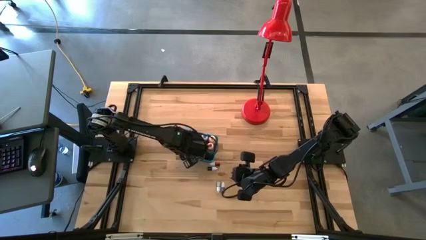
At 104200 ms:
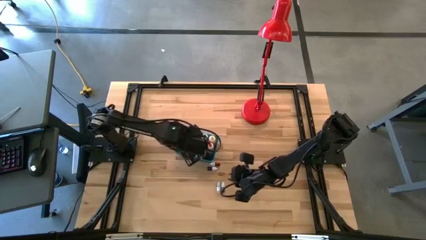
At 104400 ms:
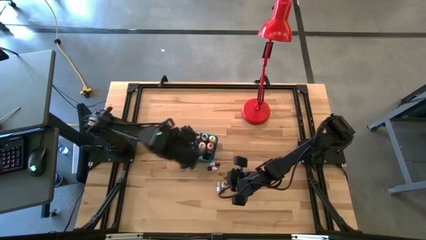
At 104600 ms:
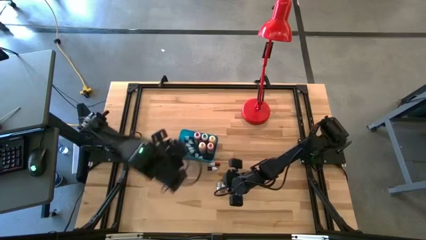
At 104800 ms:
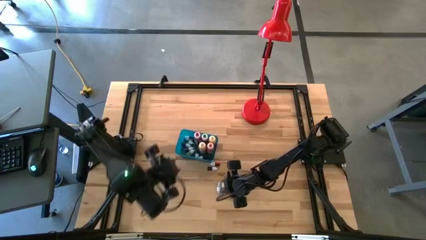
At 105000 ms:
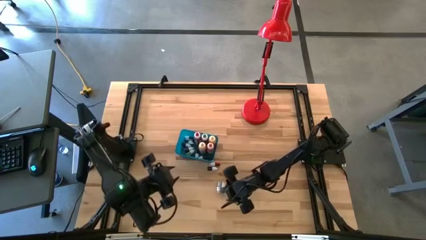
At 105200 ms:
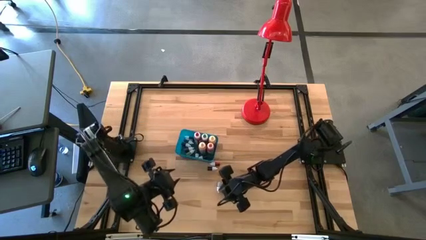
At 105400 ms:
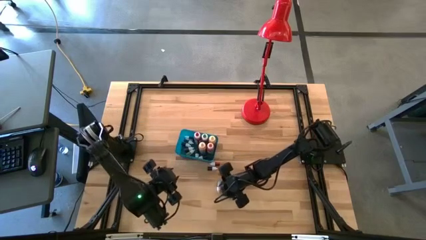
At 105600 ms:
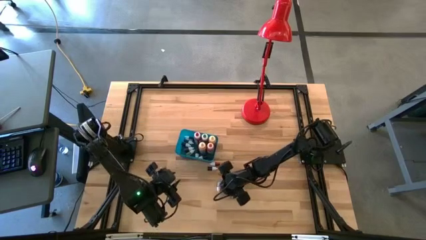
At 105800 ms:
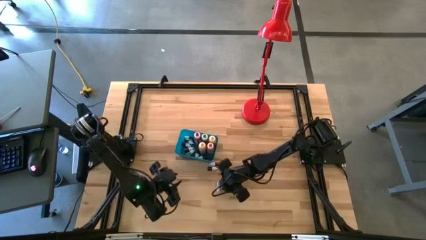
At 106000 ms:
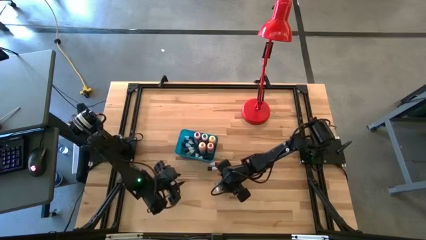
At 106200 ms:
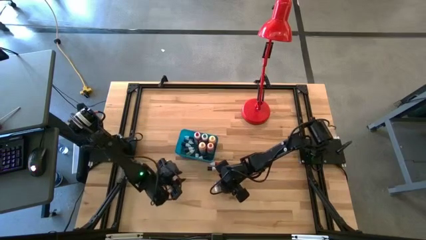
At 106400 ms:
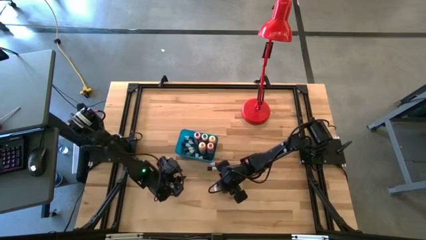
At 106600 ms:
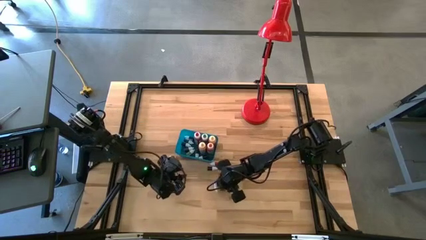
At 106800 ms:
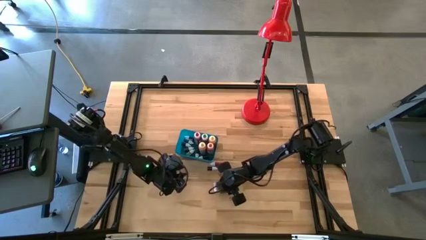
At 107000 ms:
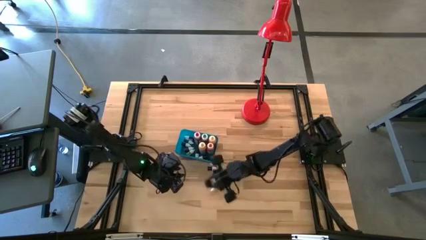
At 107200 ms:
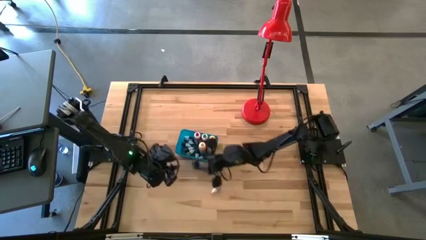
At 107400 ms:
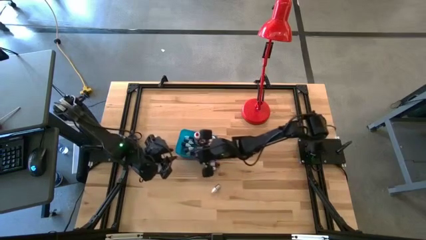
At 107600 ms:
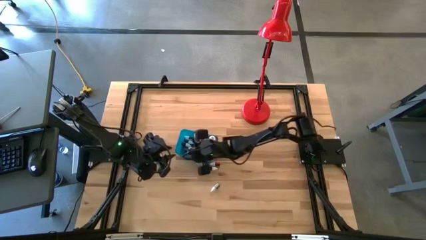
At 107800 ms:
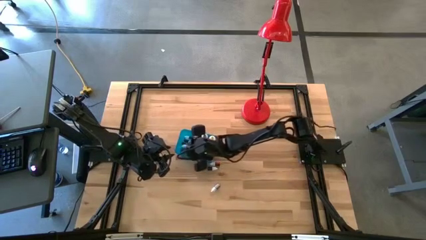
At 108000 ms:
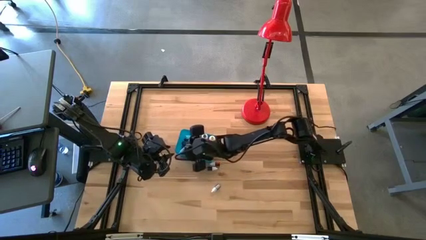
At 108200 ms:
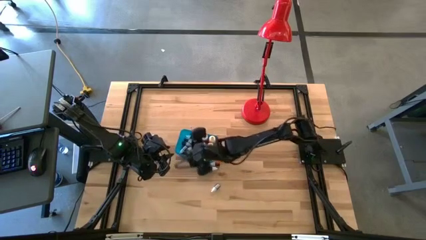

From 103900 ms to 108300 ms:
Task: Pick & Place food coloring
Put the small green food coloring into the blue bin

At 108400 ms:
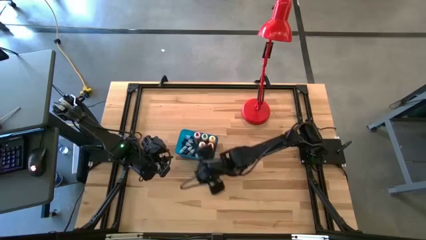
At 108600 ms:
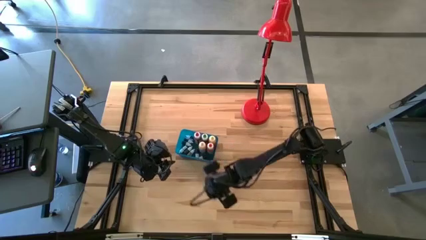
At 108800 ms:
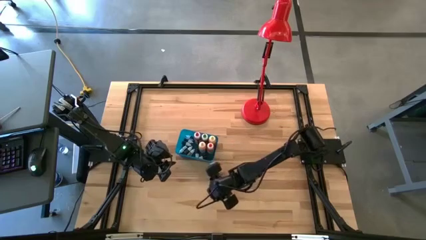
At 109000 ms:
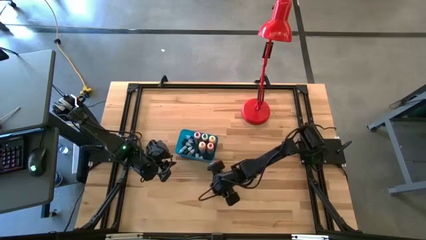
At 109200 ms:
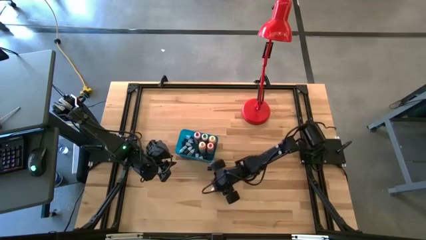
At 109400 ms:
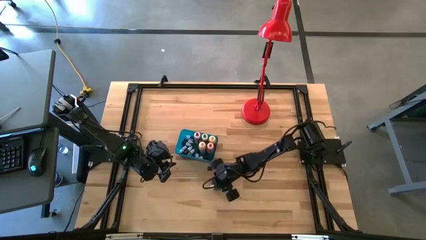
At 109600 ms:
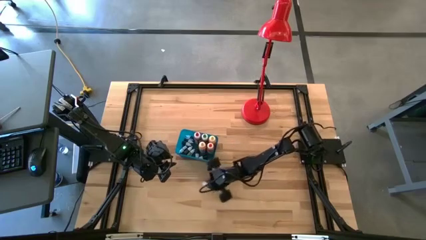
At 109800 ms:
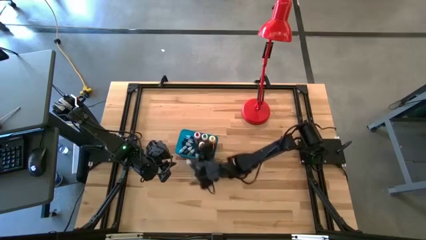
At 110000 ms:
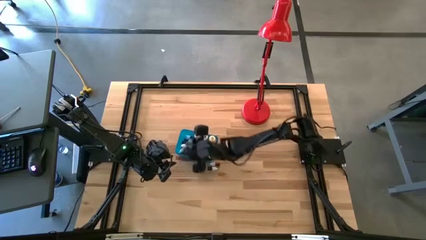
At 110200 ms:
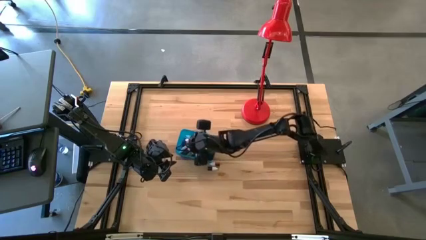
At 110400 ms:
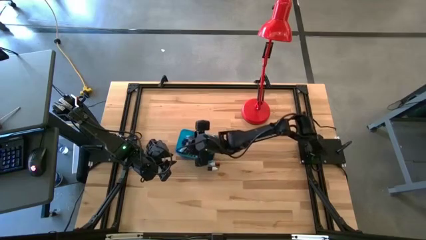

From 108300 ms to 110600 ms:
Put the small green food coloring into the blue bin

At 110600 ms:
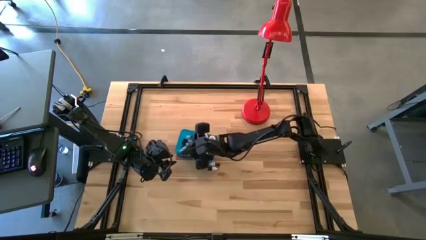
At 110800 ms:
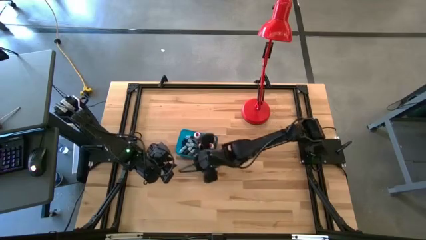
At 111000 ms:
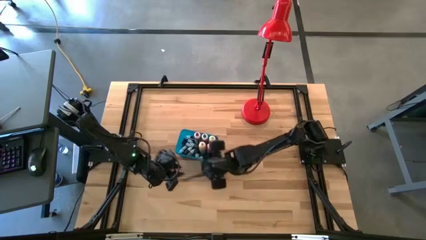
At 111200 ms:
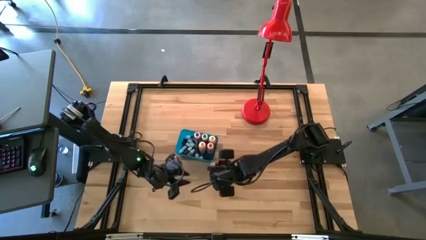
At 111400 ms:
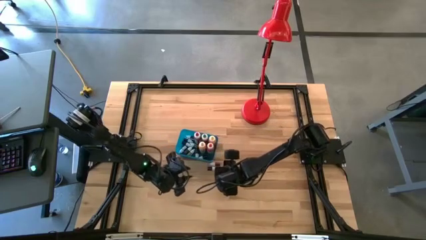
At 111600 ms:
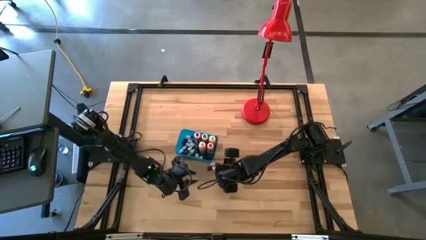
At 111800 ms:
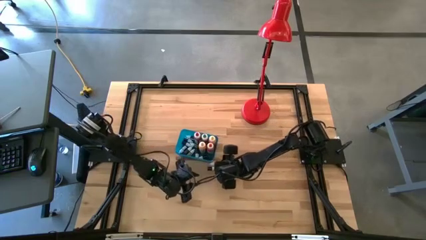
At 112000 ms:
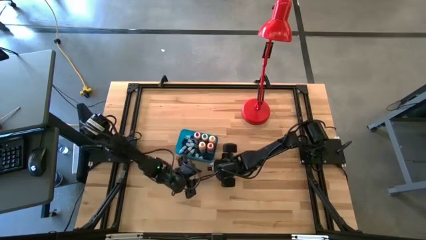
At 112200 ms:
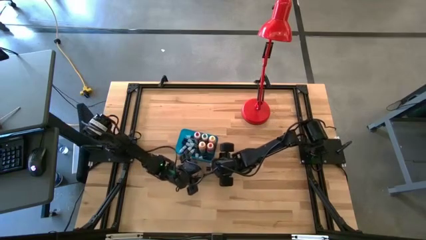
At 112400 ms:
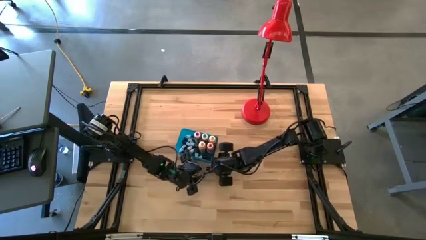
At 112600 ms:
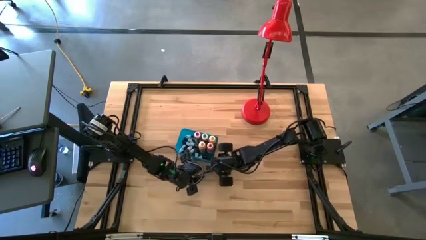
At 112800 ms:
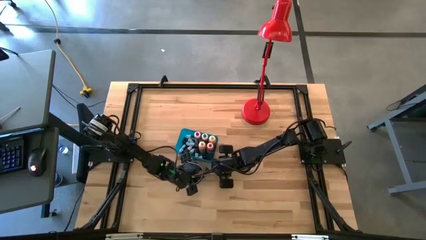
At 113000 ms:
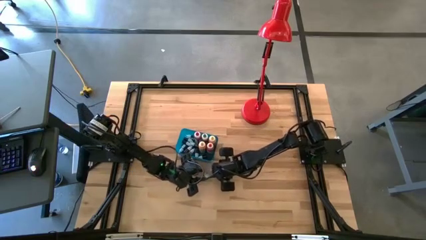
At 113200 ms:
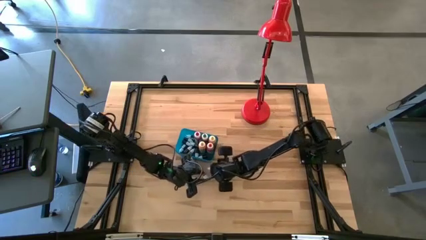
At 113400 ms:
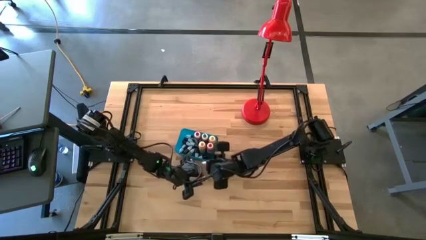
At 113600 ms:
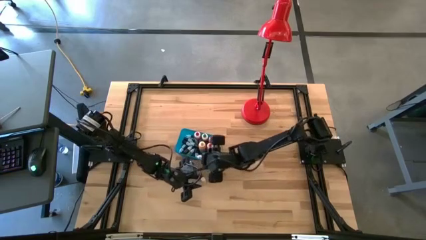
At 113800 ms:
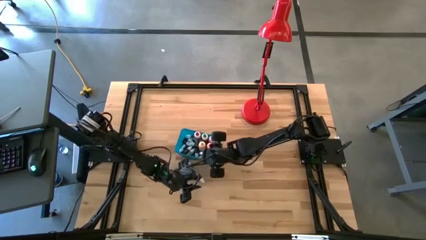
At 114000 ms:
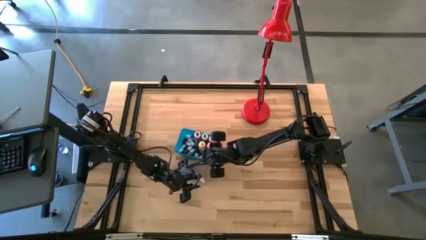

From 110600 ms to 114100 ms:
Put the small red food coloring into the blue bin

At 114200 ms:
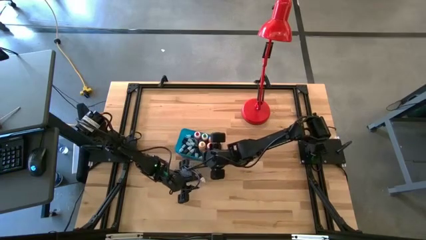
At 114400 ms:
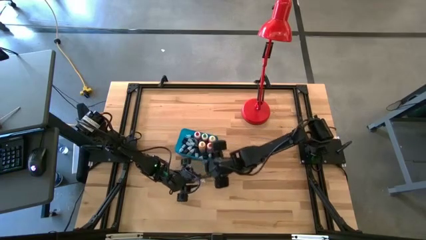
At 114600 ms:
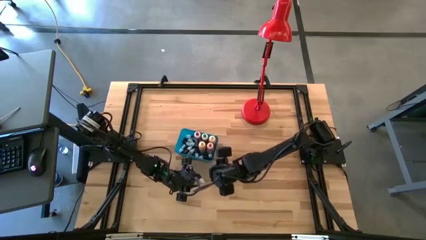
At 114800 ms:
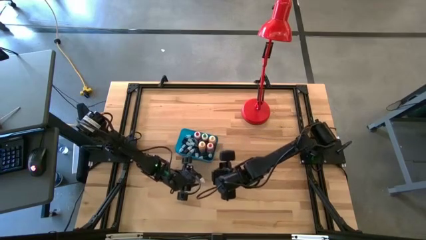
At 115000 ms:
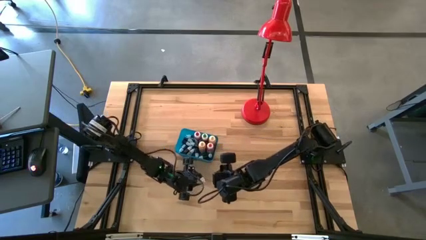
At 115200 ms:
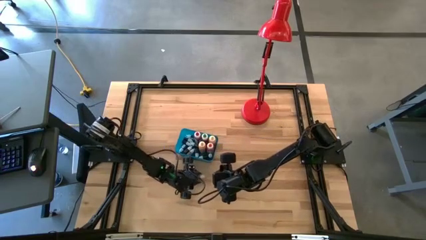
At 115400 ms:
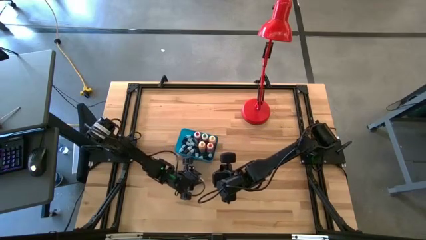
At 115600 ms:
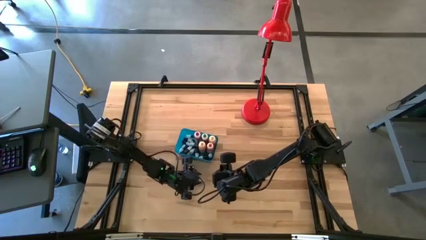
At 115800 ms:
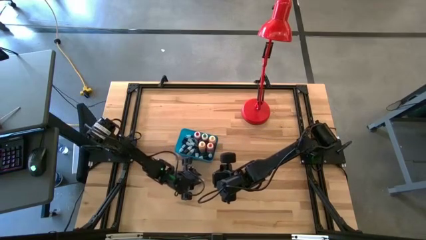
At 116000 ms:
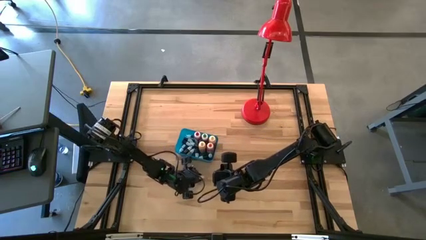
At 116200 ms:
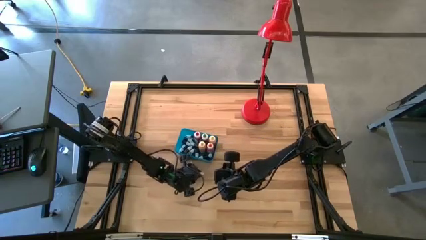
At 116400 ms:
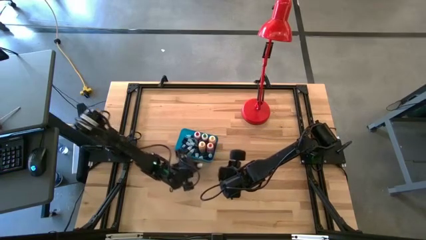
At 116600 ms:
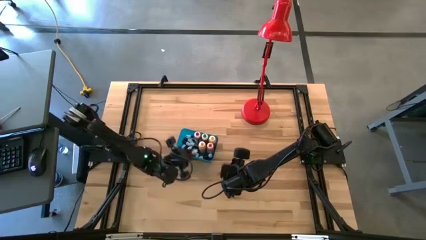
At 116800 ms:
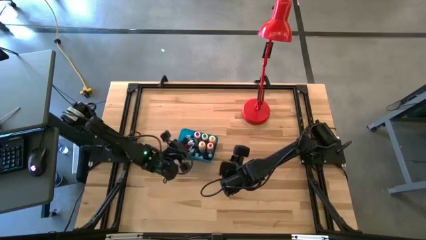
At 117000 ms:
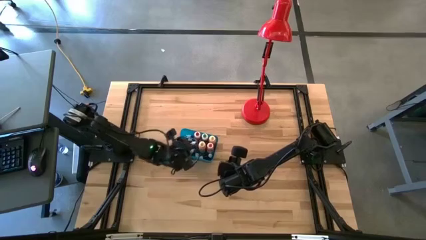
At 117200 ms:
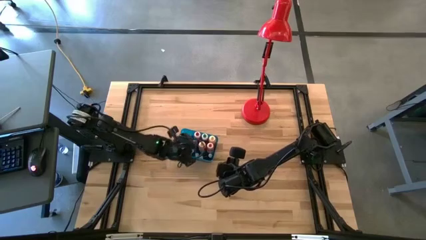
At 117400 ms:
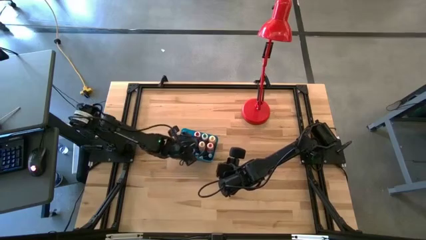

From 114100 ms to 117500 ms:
Put the small red food coloring into the blue bin

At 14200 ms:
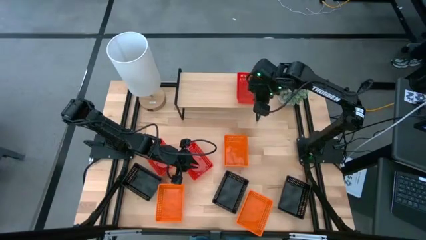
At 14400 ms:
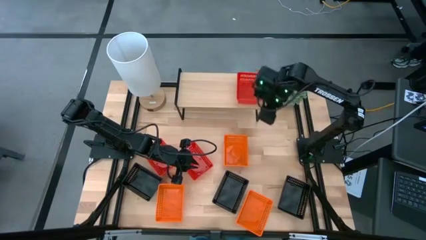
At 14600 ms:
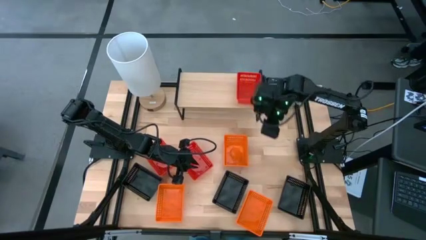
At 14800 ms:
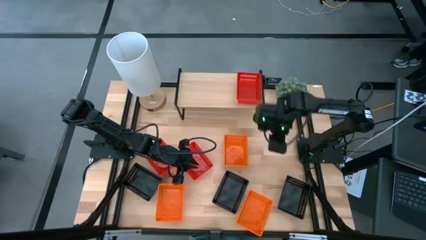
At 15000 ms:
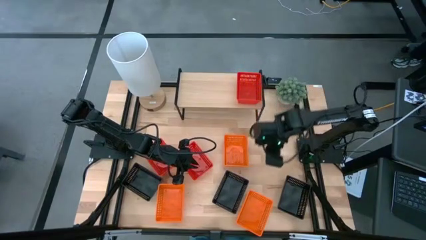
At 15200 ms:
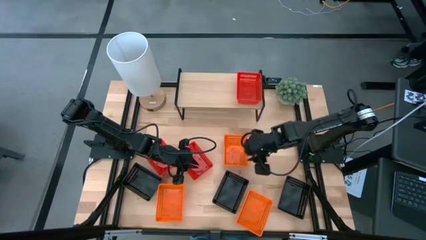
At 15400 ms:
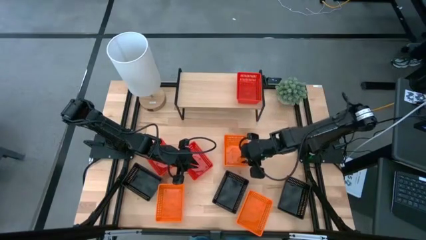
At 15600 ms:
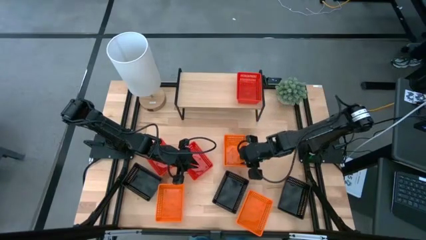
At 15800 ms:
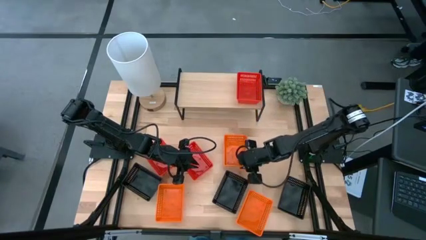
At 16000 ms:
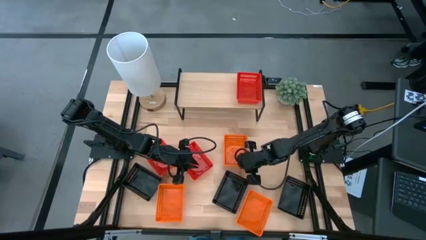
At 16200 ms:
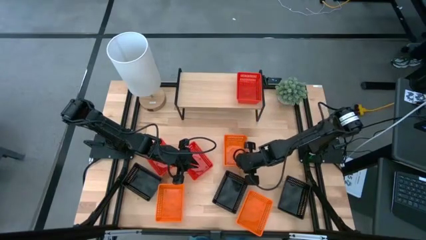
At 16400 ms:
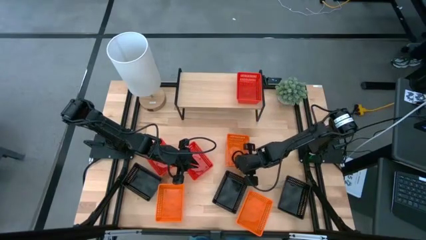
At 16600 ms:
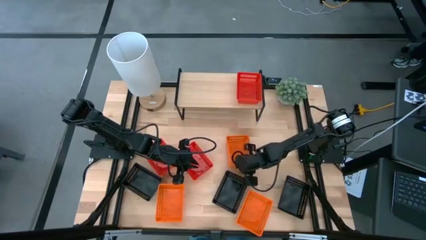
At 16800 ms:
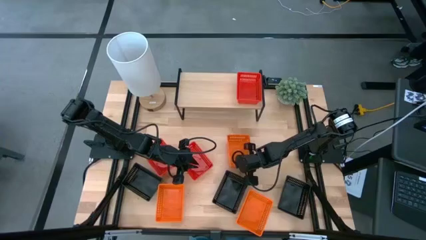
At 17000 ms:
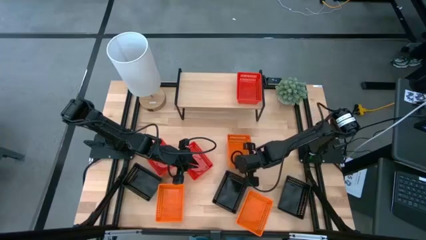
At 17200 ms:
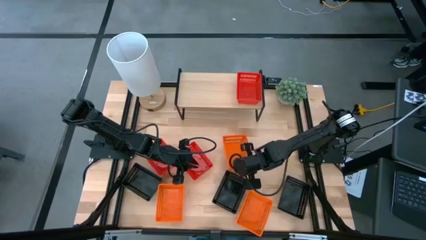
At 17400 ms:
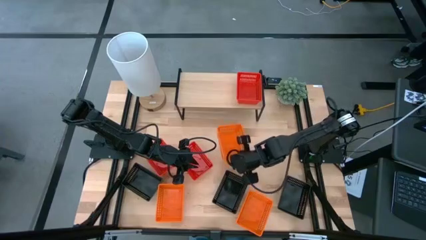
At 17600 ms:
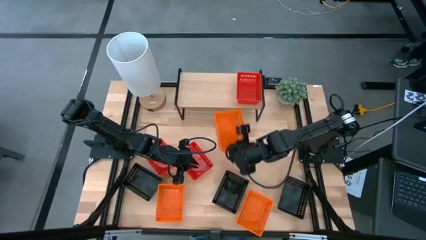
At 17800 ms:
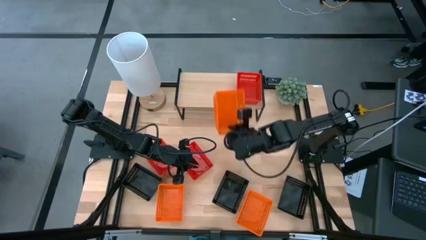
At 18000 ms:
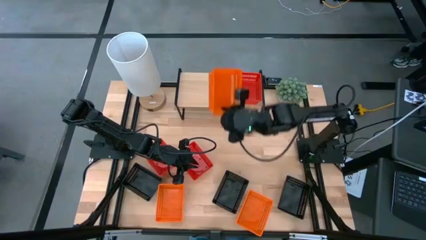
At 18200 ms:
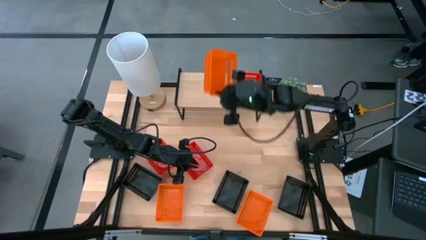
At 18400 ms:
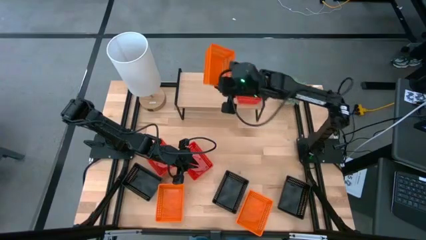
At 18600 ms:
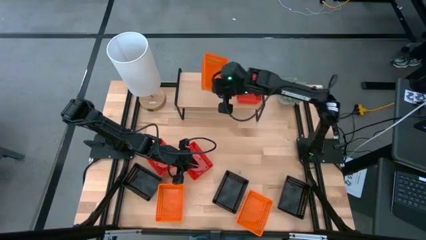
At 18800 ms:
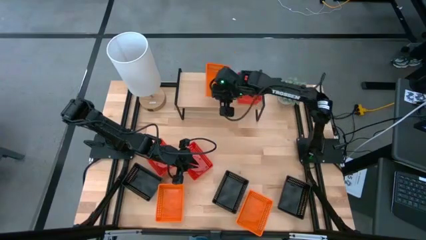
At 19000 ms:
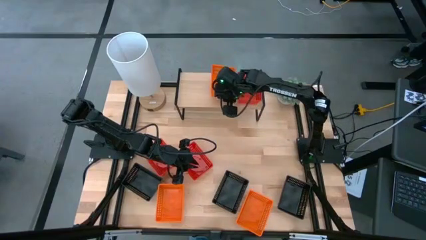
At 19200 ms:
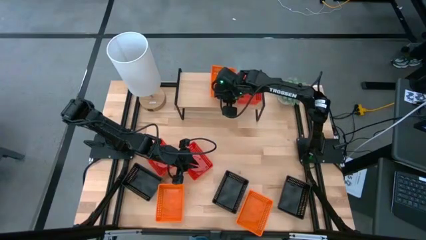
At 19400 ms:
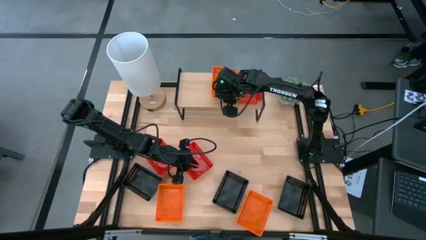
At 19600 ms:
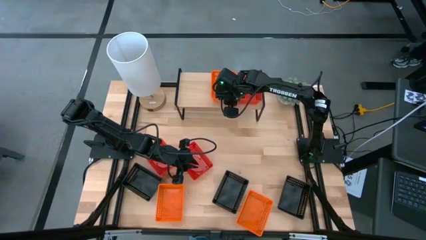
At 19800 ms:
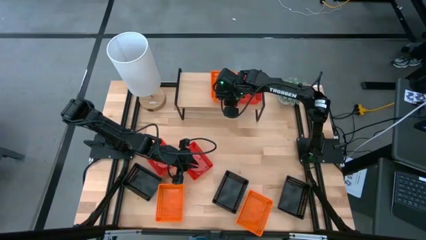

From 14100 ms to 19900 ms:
Task: Stack baskets on shelf by color
Put the top right orange basket on the shelf
